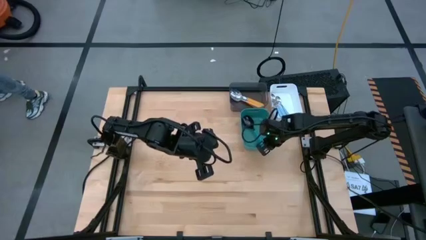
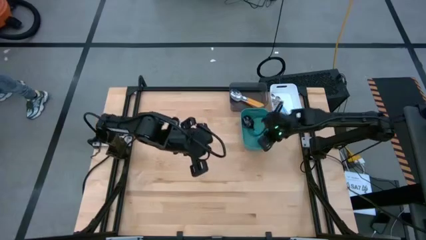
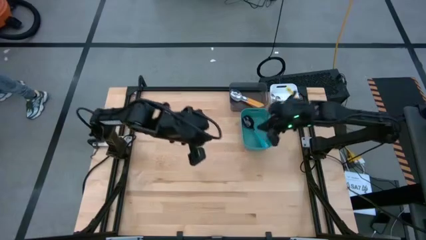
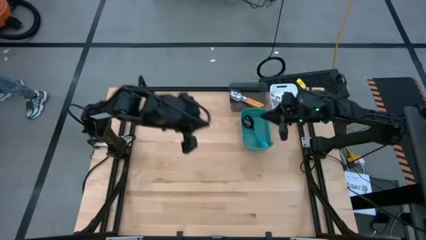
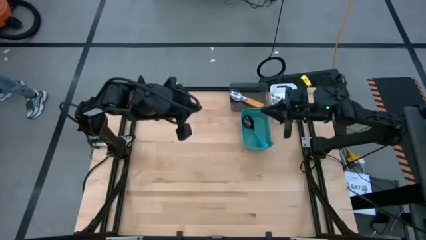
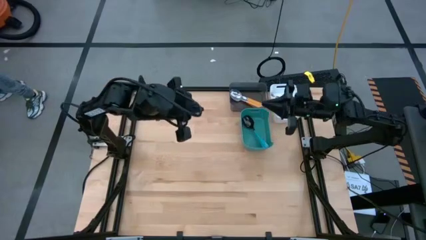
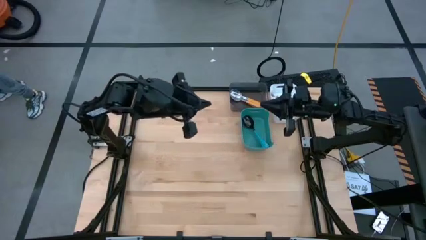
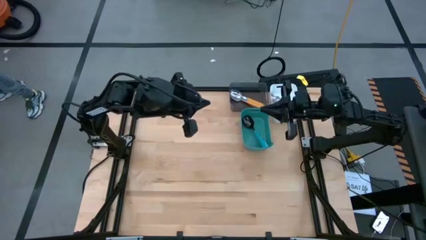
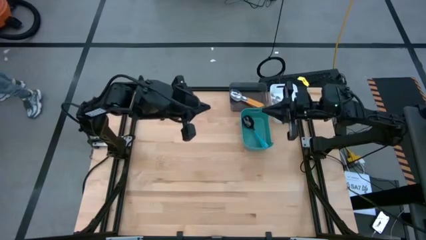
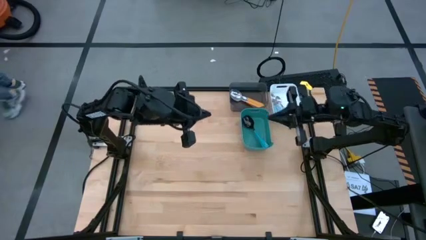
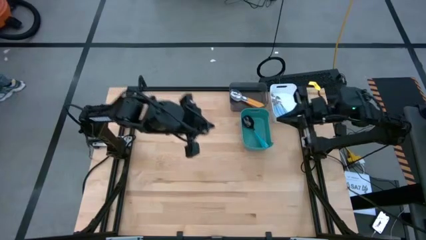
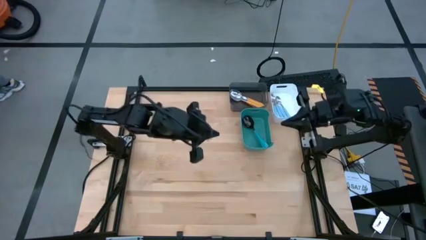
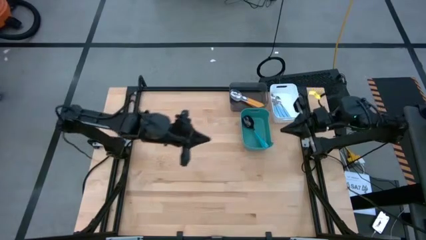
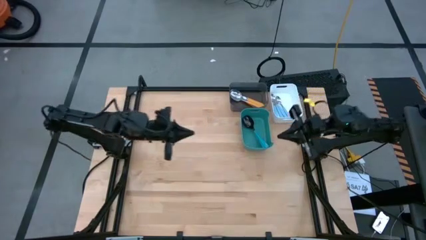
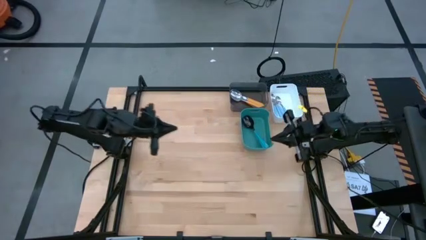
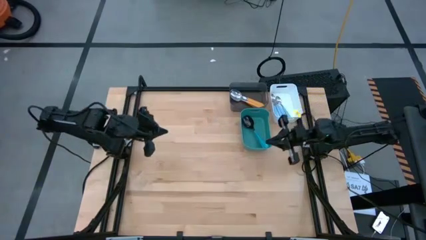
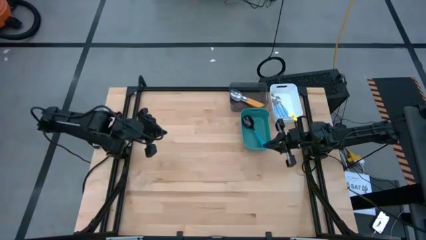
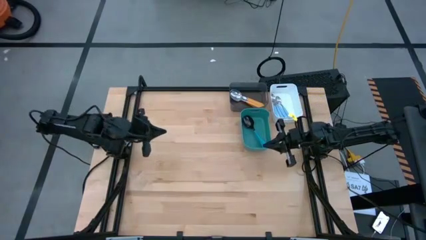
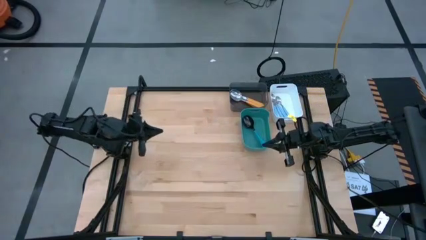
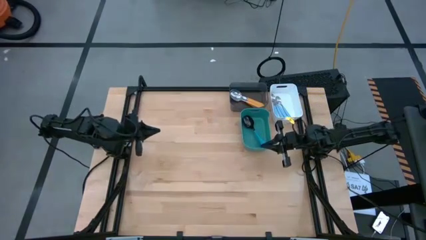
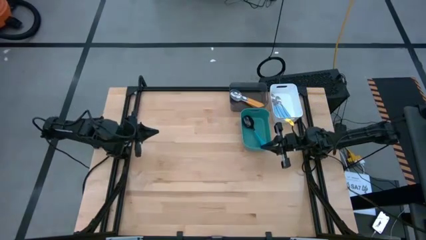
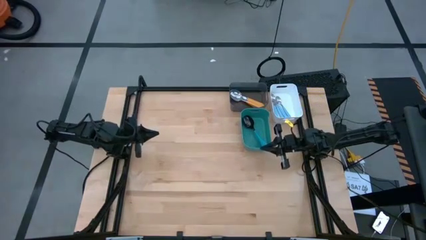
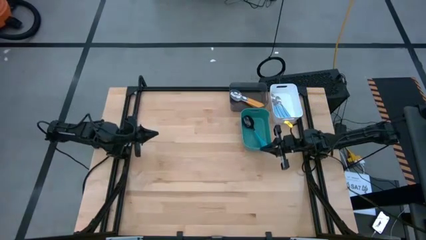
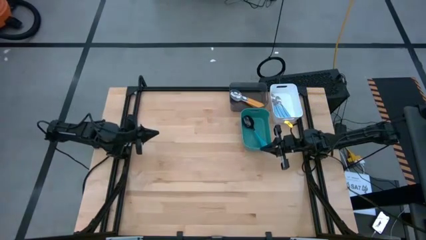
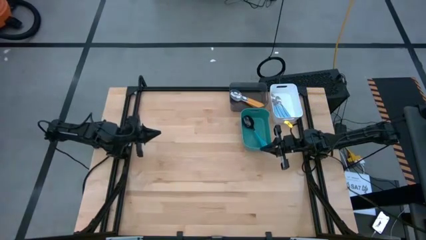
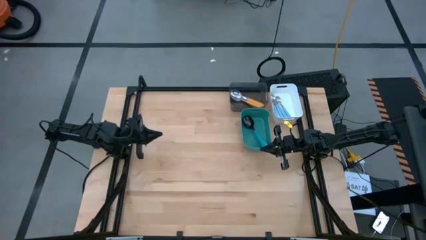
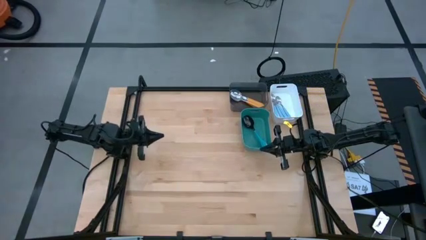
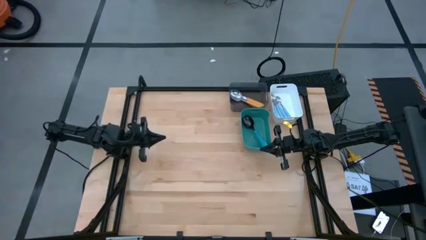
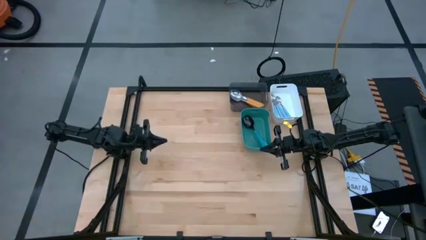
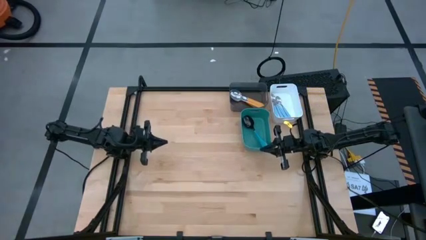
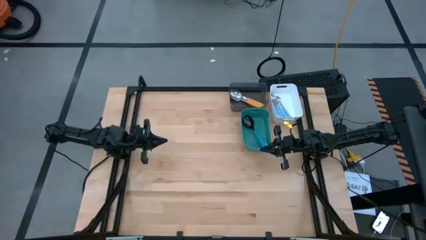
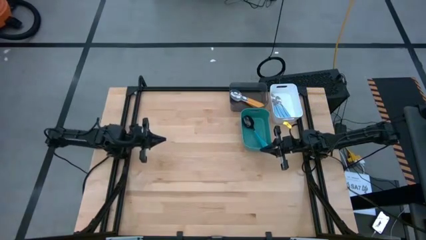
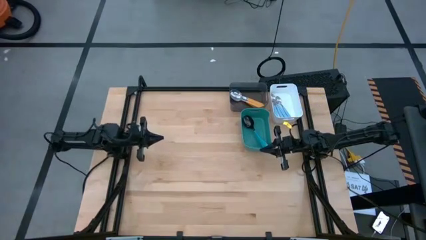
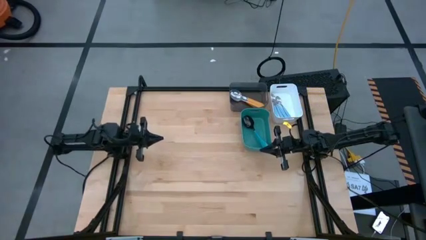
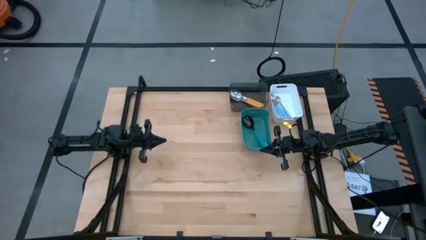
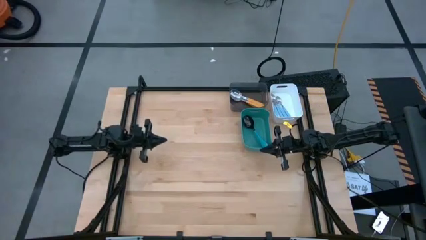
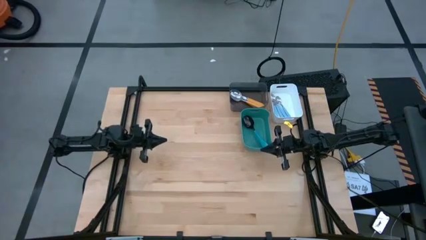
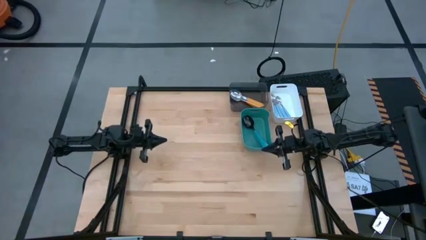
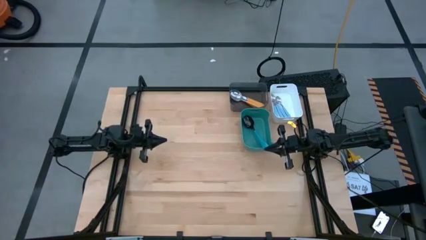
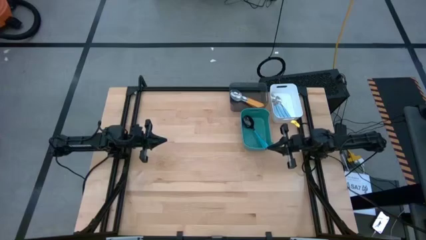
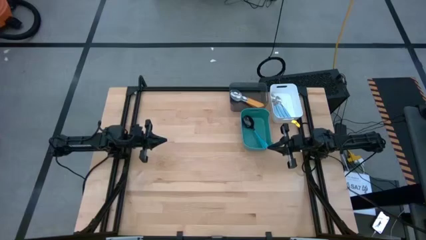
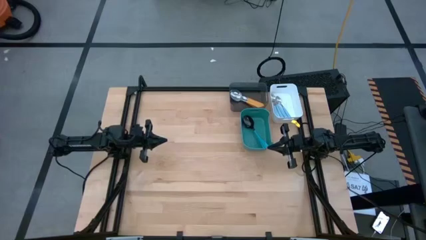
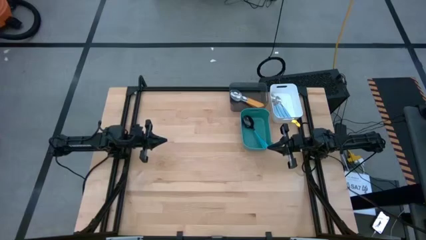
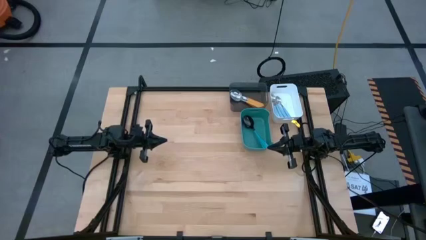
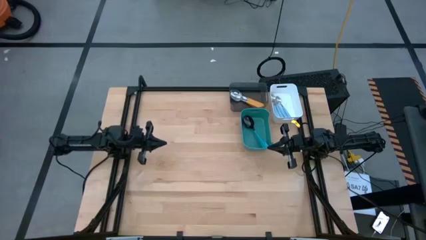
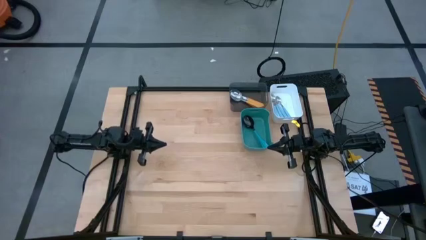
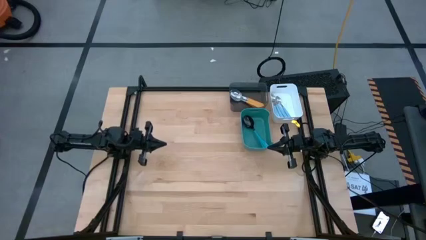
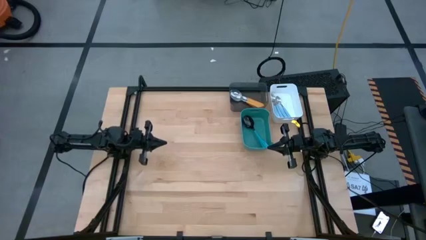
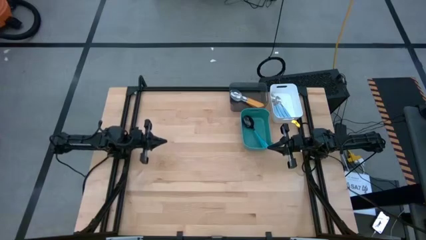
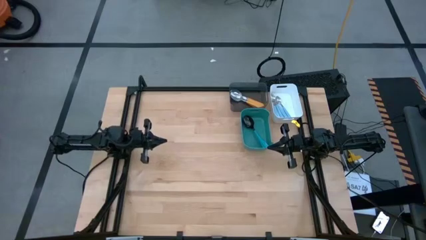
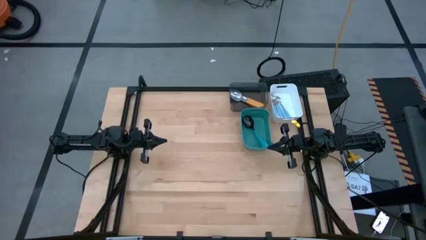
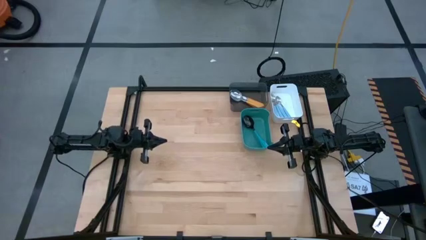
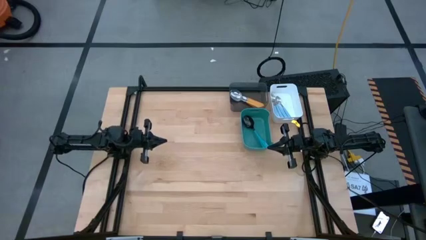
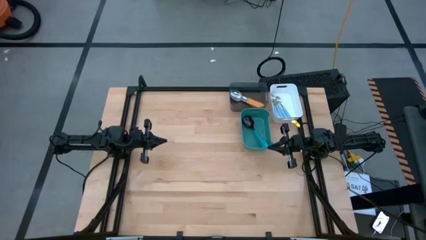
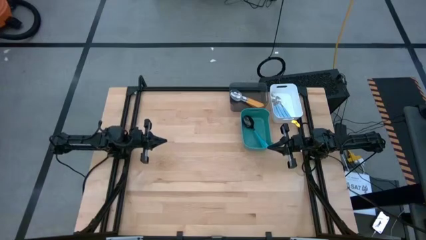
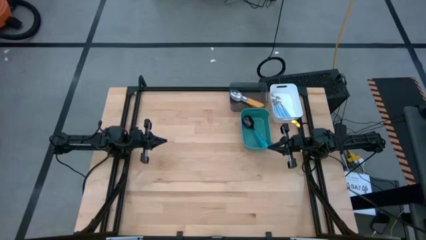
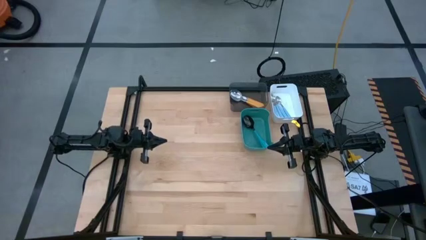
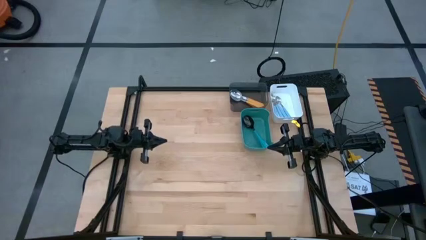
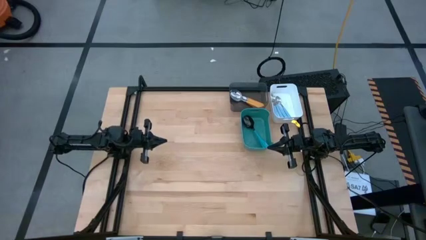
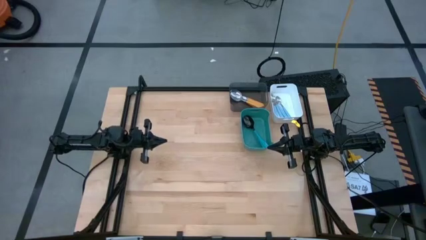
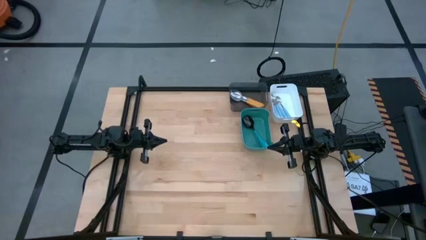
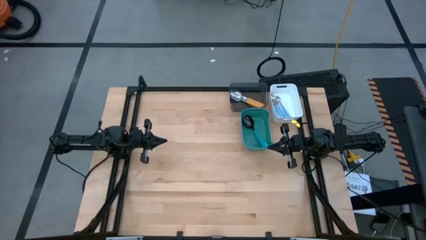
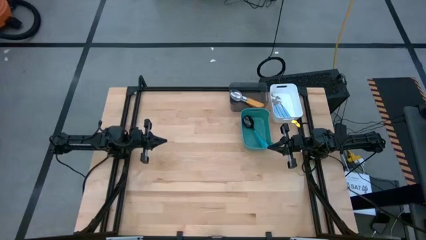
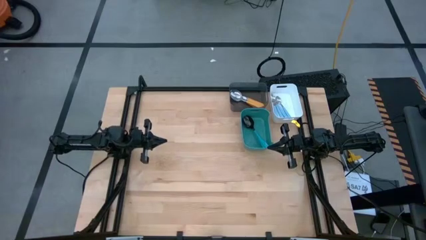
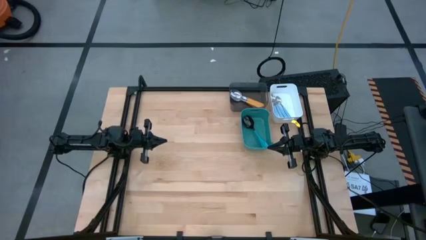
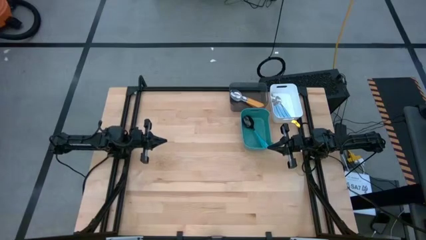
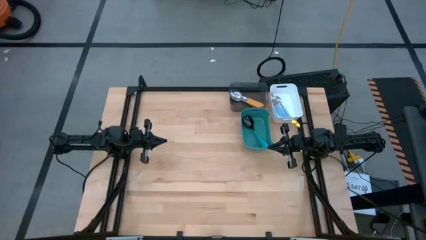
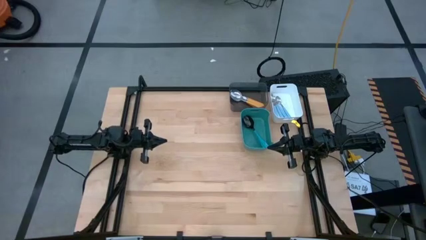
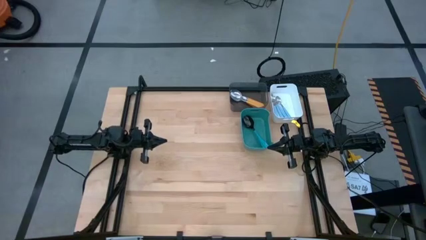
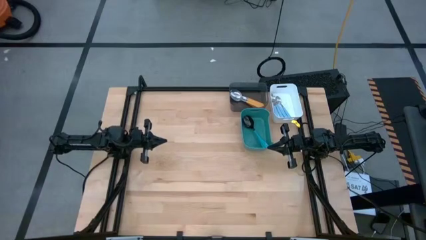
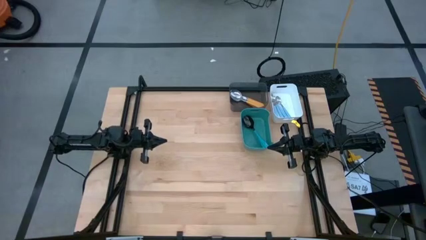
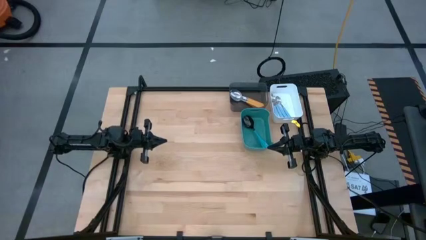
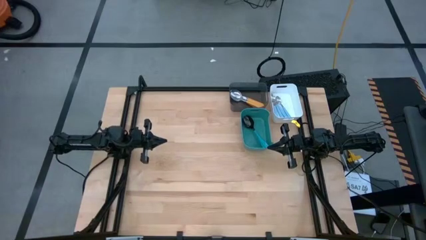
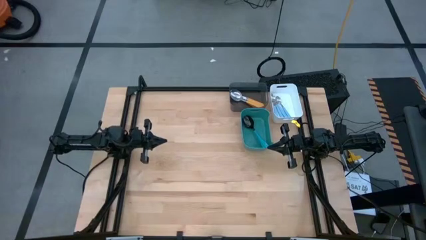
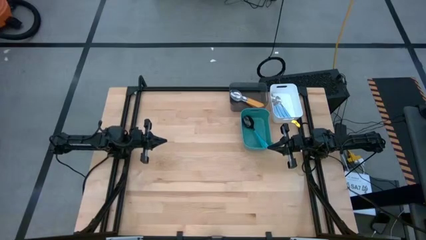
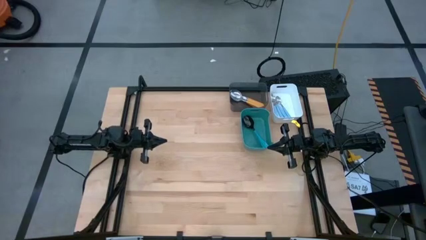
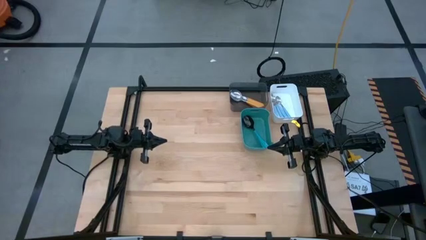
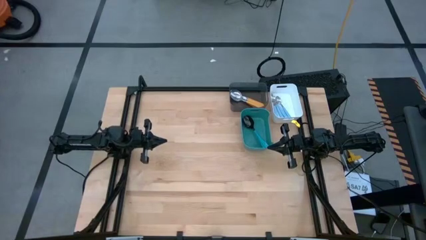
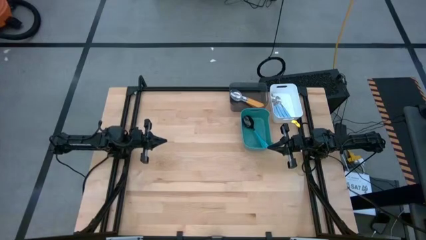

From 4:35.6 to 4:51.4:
Task: Sort silverware by color (type)
Return to Home Position

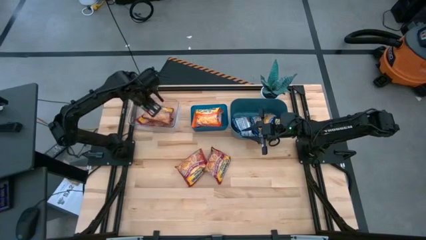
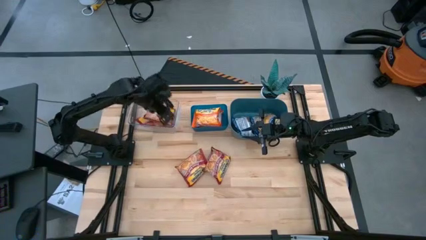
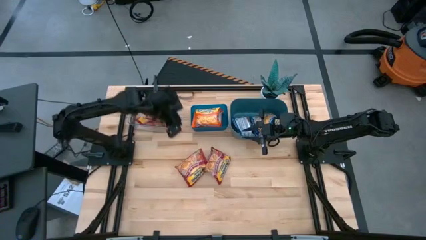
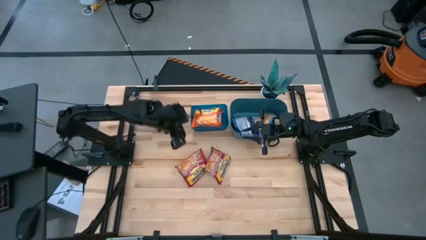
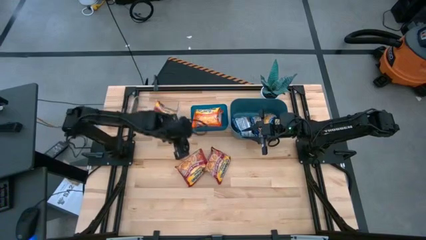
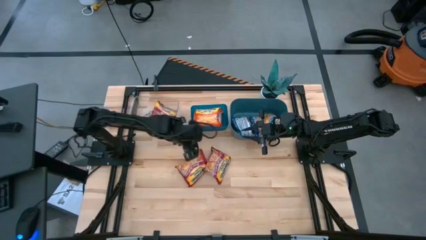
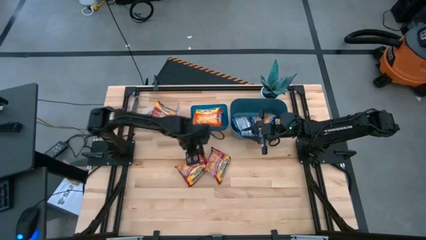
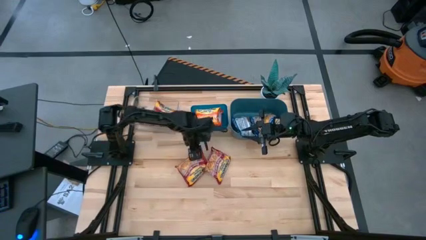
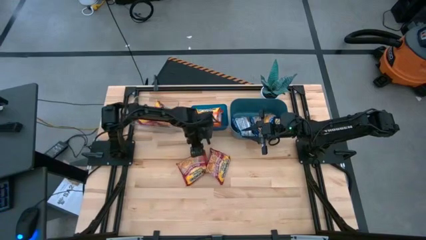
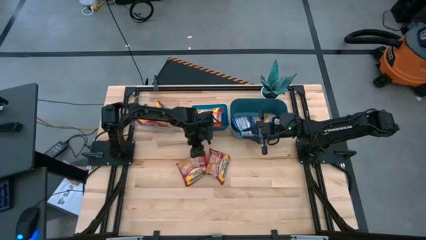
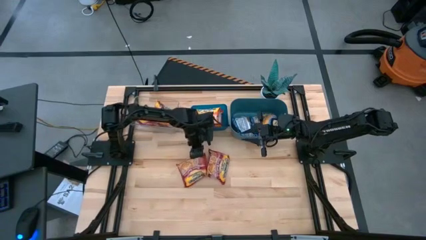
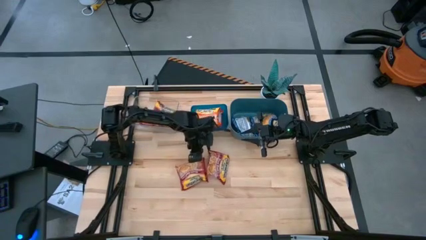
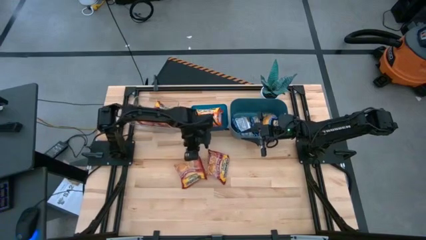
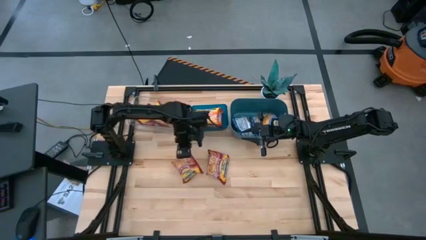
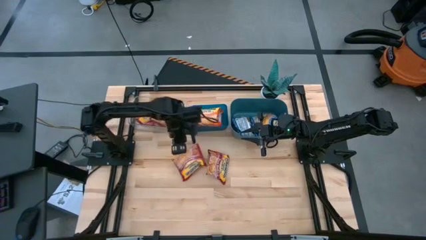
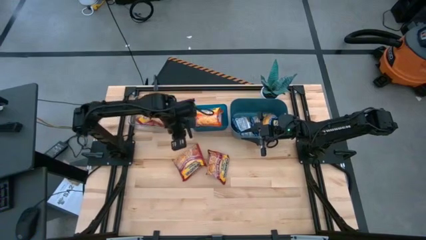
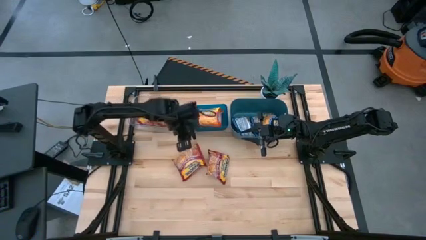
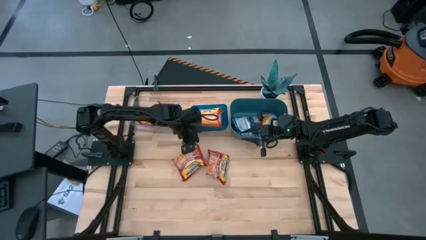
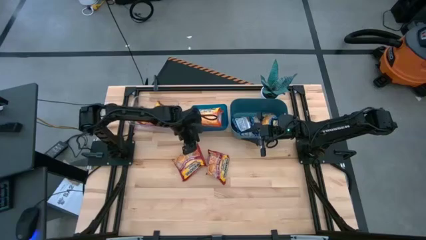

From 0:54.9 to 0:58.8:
Task: Sort Maruchan noodles
Put the red noodle pack into the transparent bin
